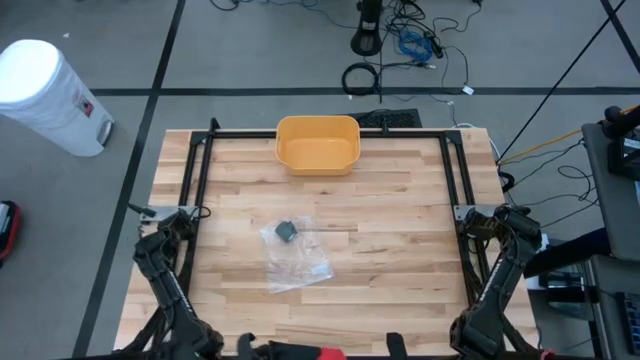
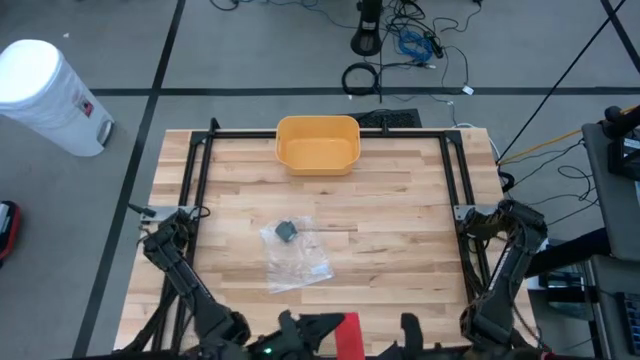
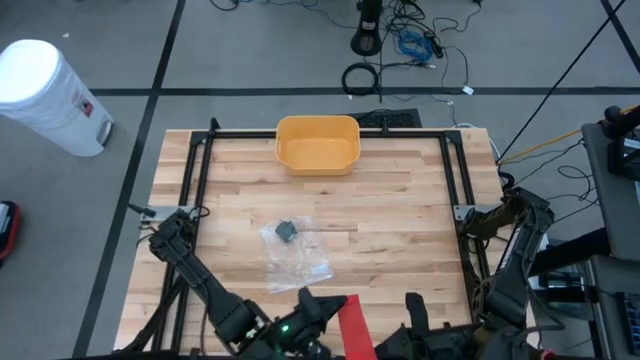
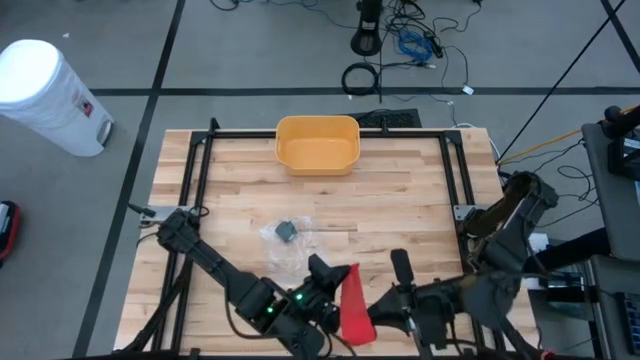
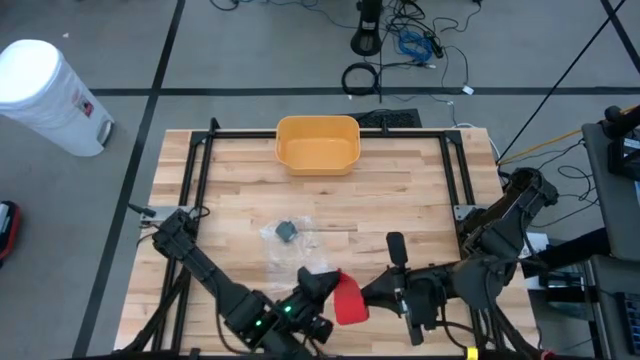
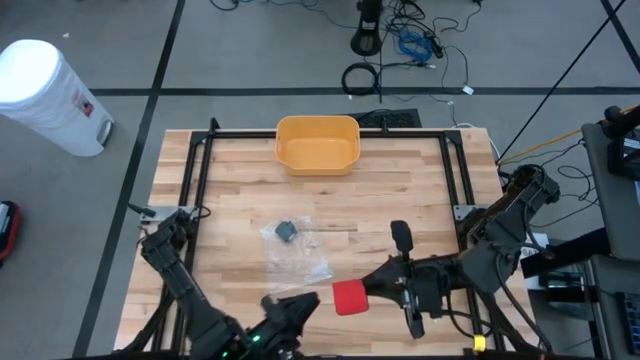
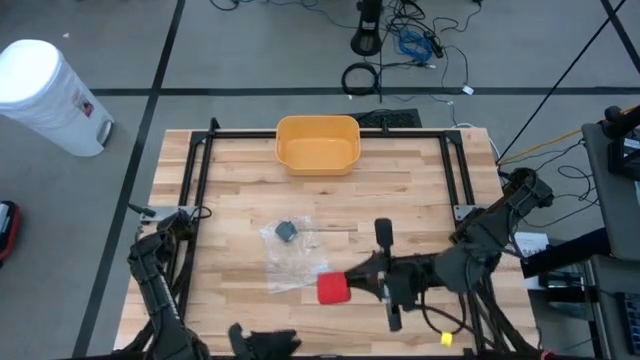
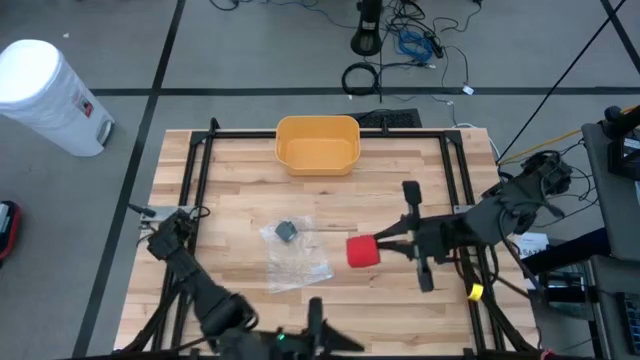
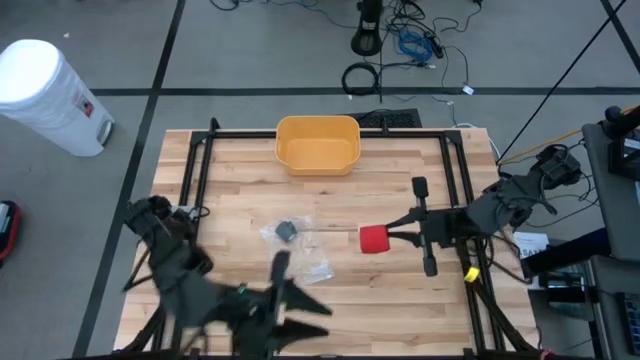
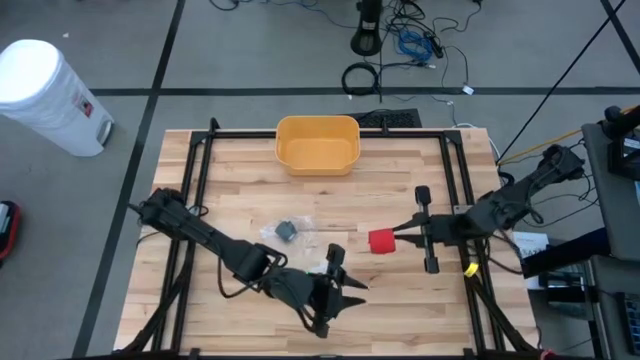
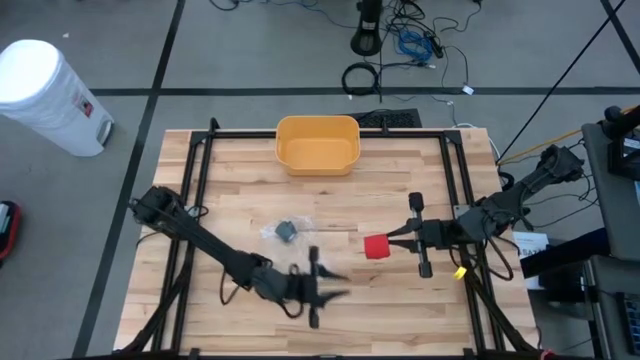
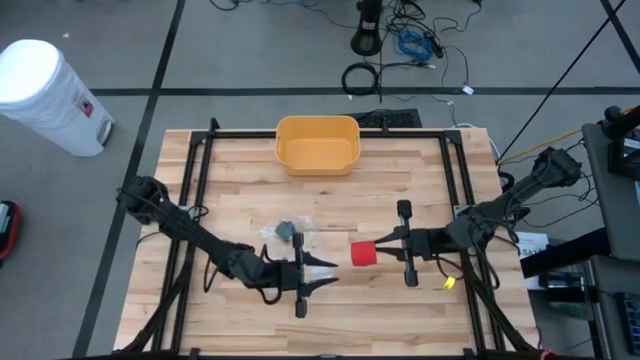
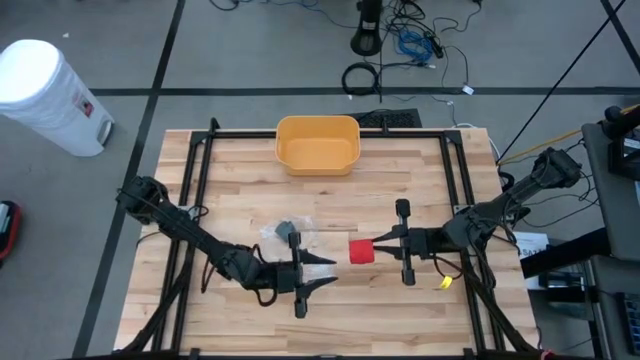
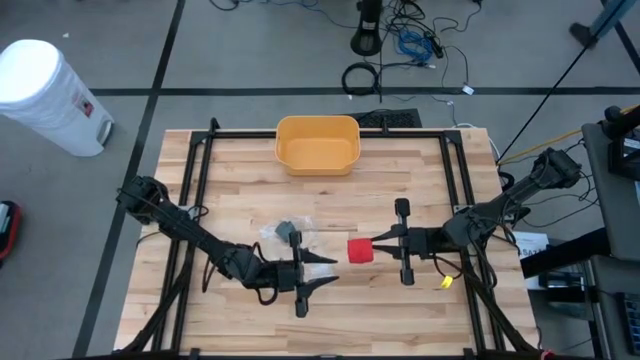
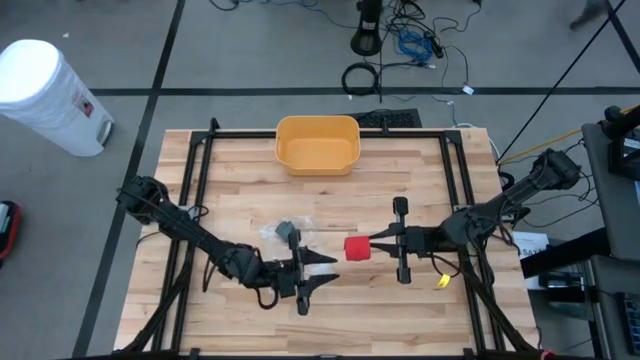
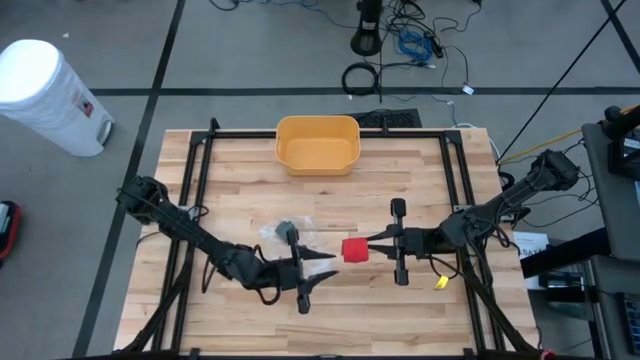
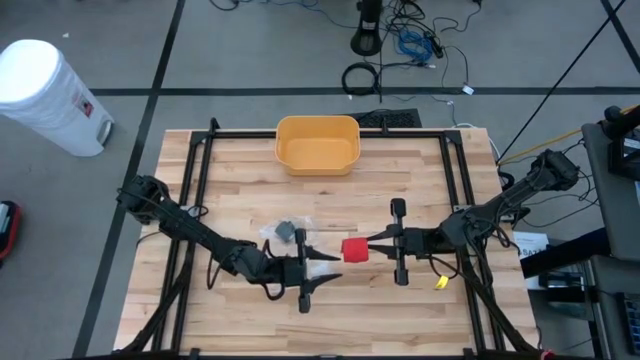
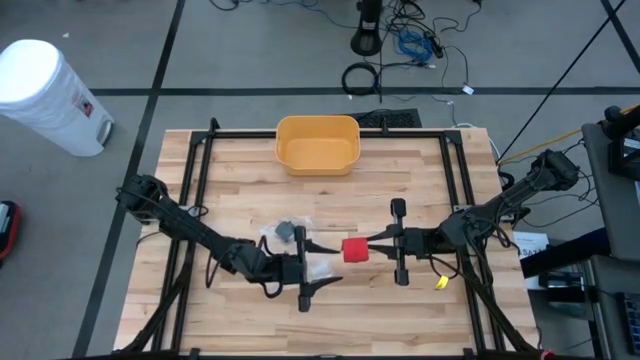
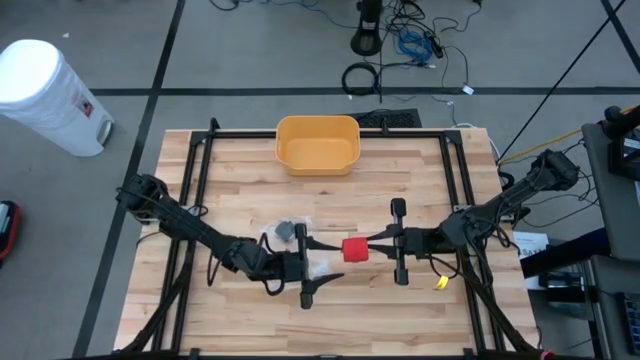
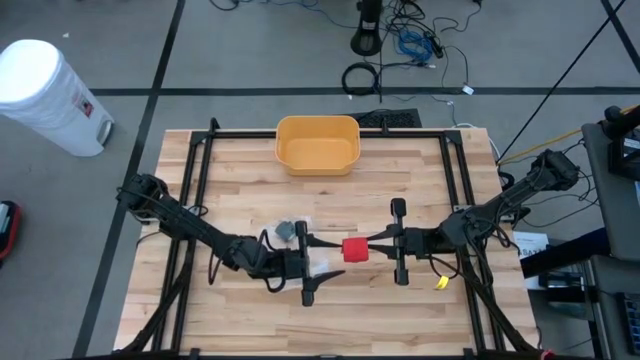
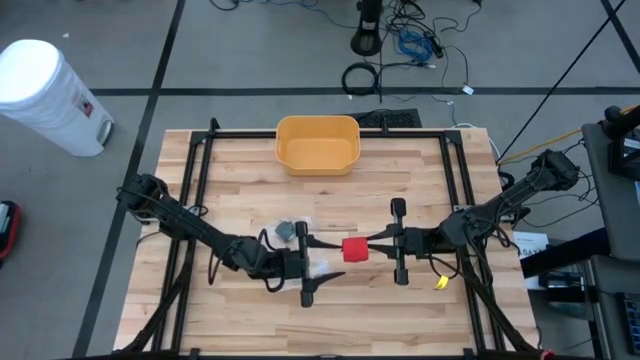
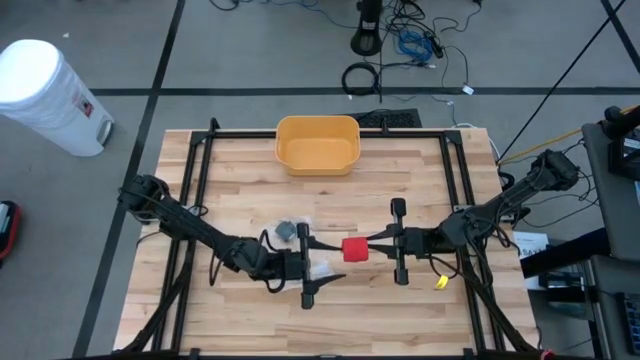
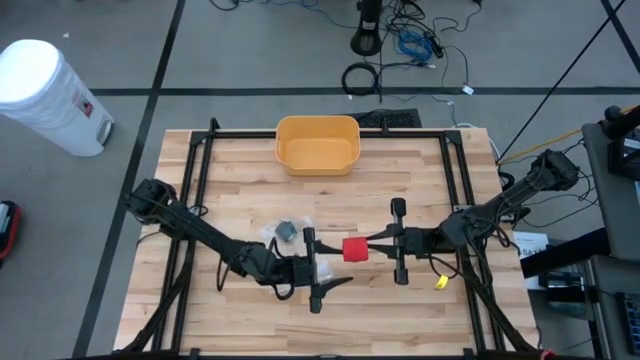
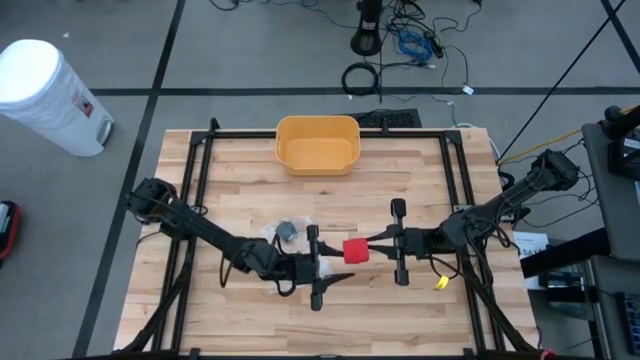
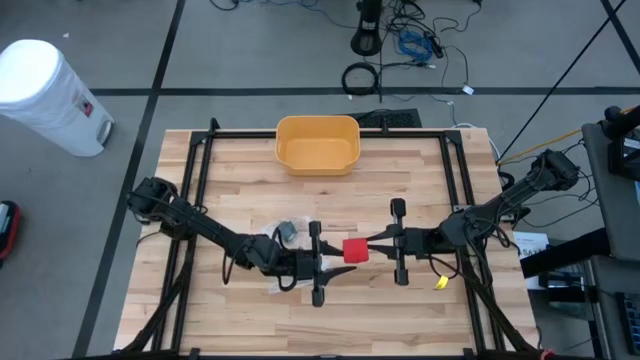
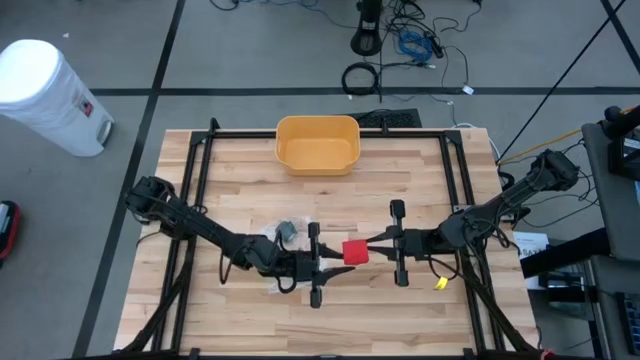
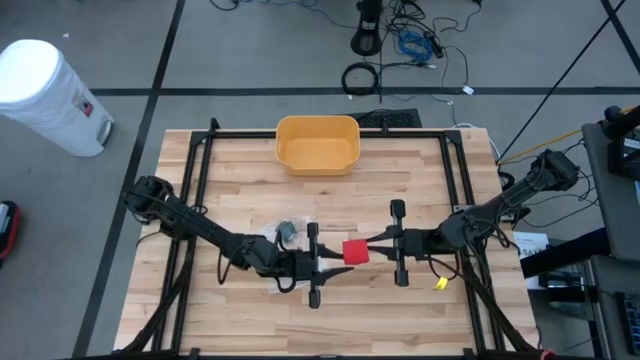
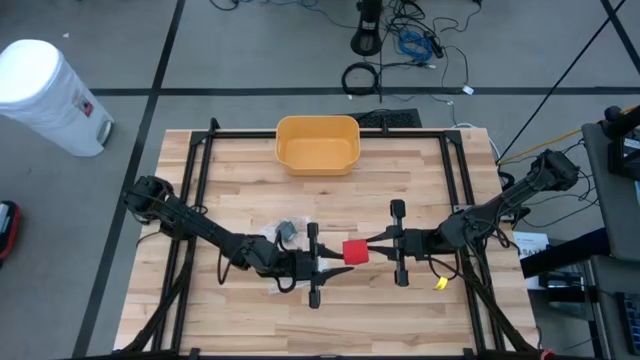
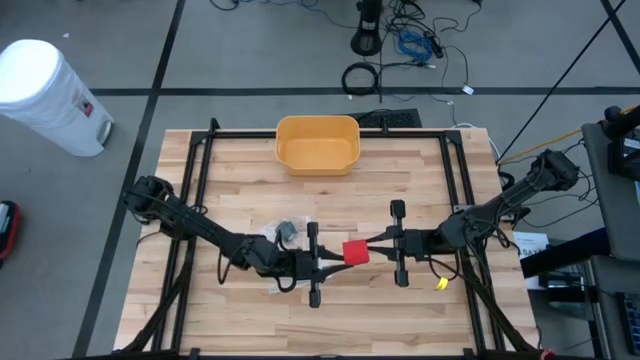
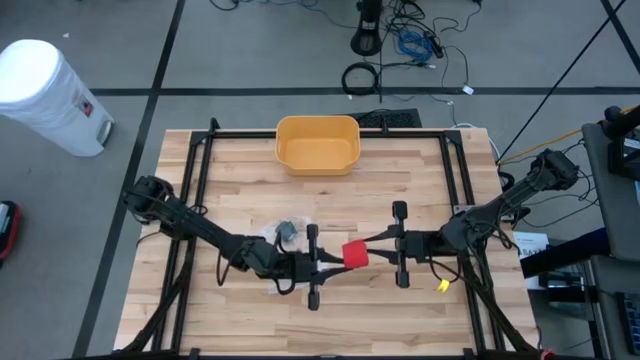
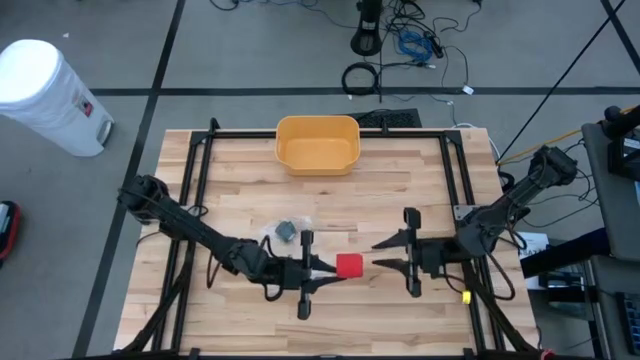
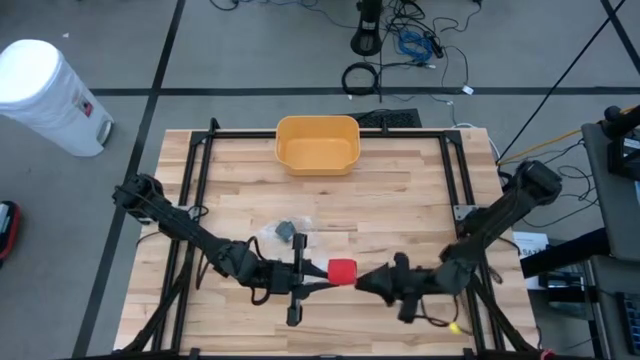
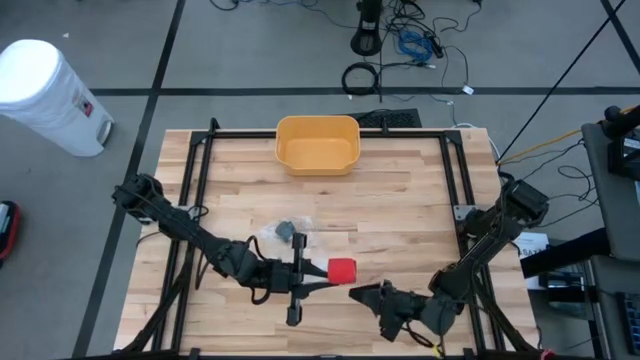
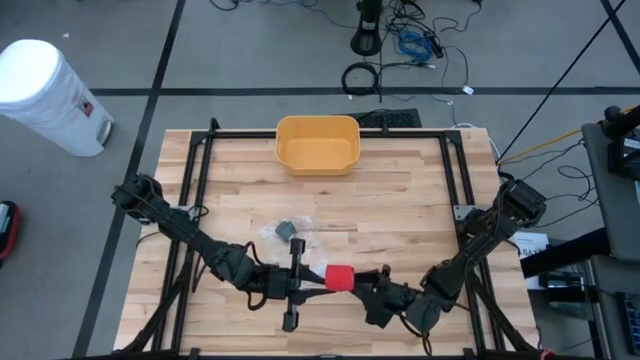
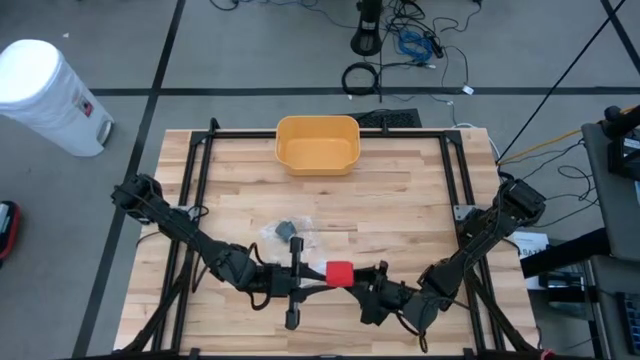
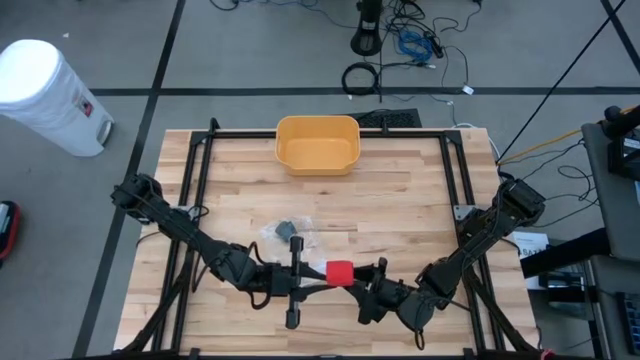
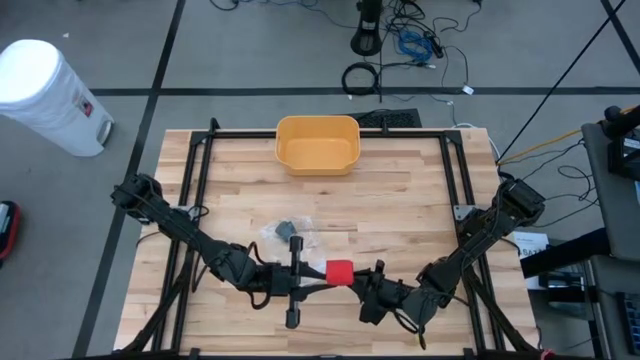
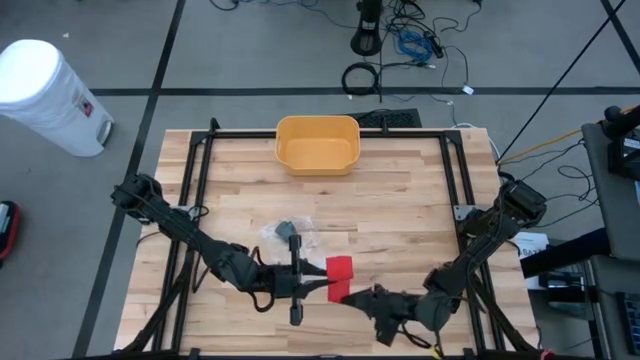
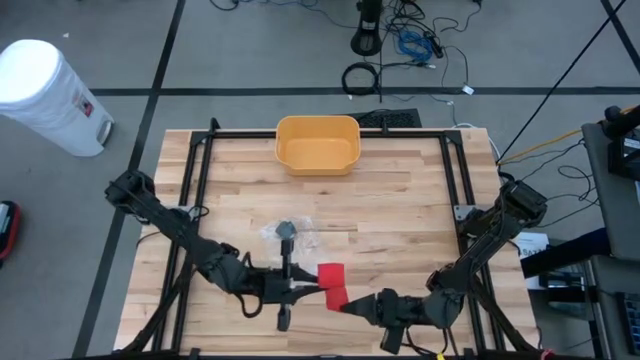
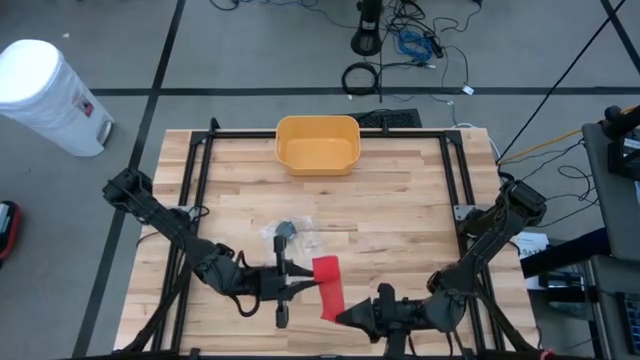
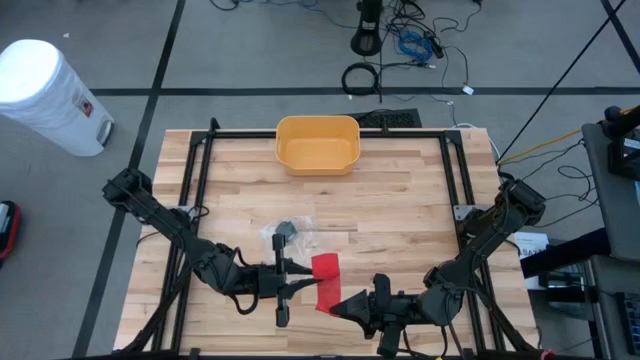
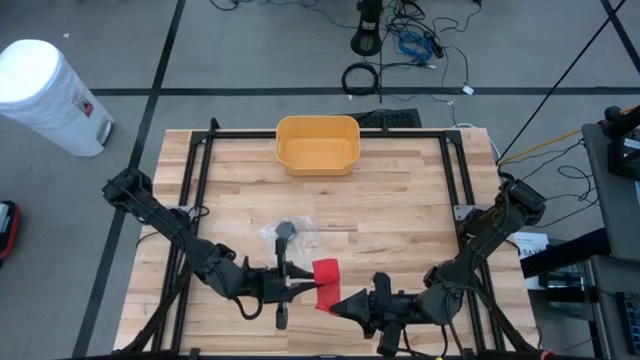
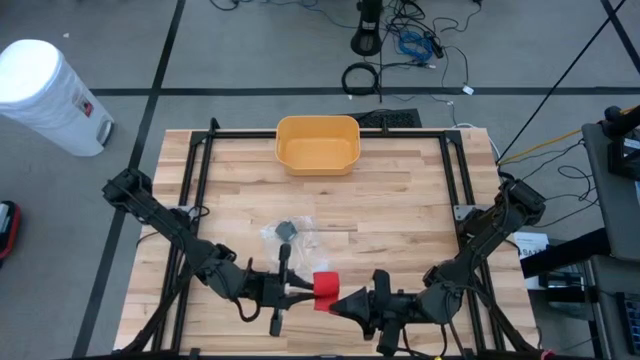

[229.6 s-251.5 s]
Task: Roll bandage
Roll the red bandage
